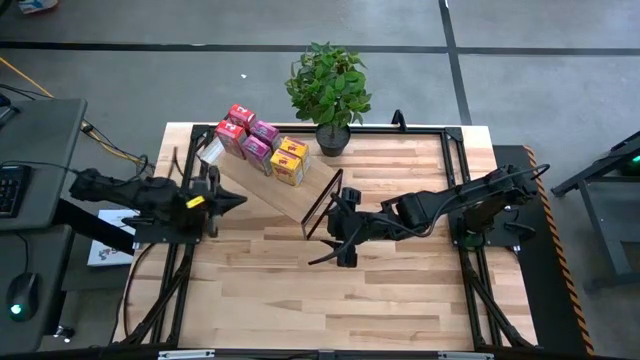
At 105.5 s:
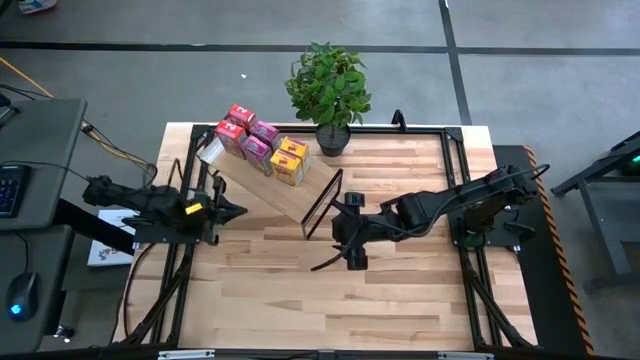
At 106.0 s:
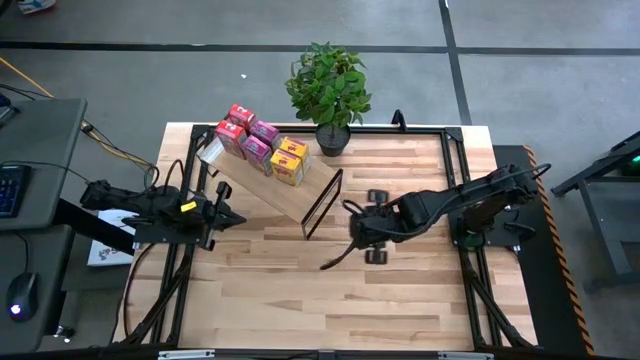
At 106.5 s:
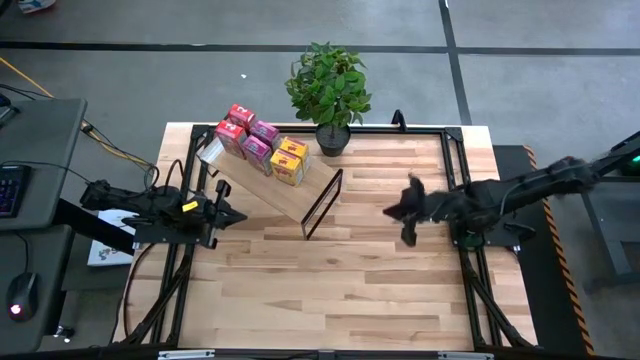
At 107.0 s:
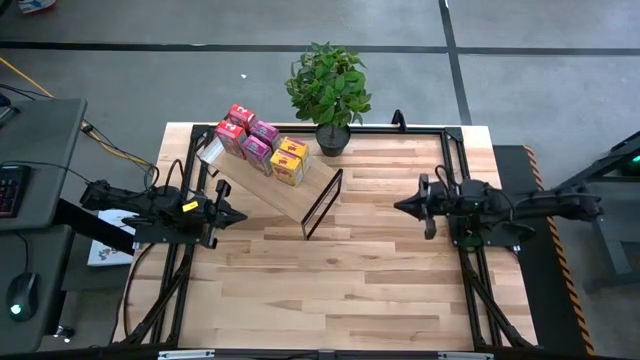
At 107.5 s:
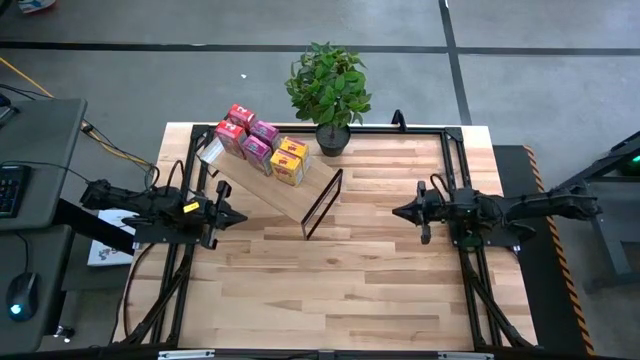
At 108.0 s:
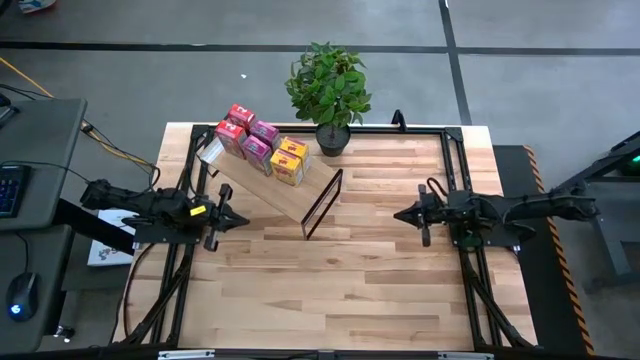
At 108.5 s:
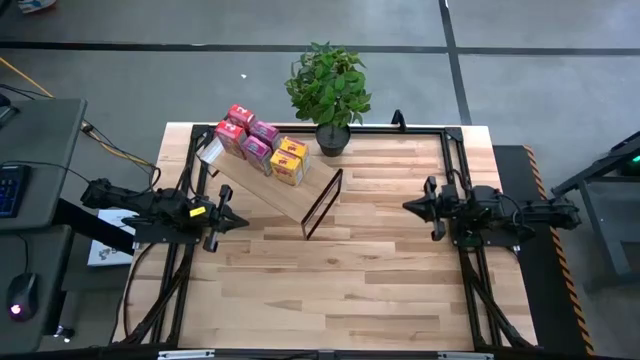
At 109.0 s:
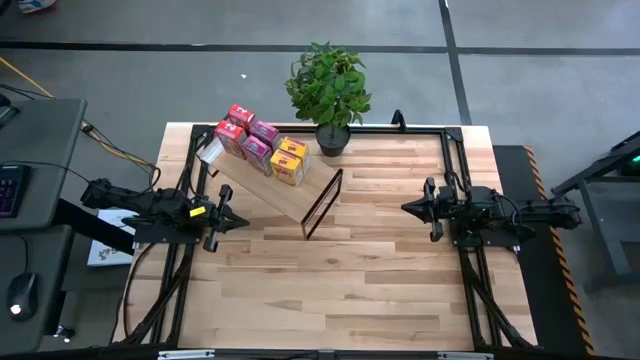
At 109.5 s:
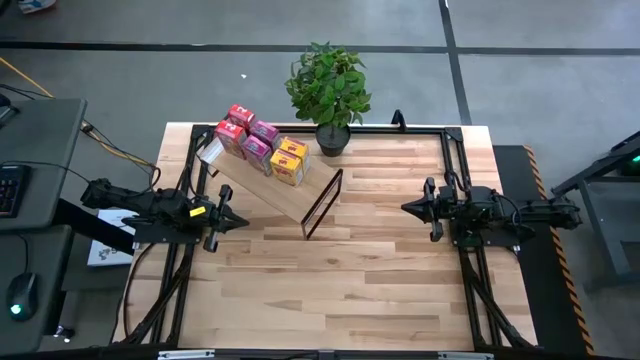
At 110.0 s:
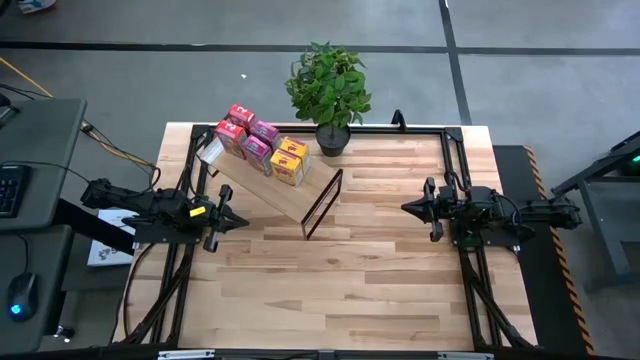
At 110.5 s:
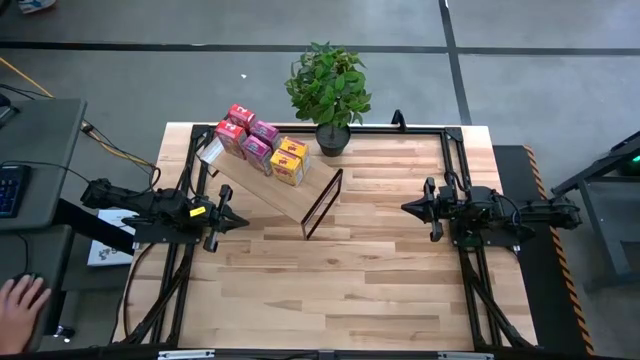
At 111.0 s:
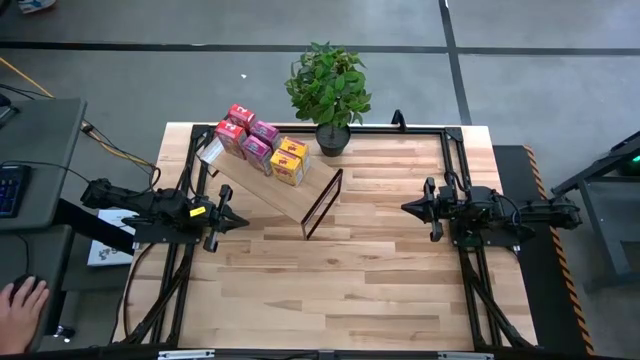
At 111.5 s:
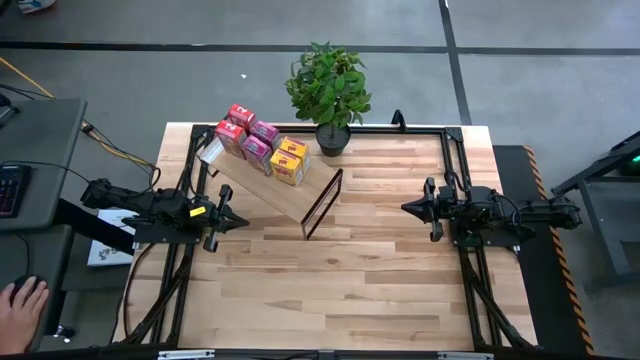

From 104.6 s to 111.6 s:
Task: Stack cereal on shelf
Return to Home Position

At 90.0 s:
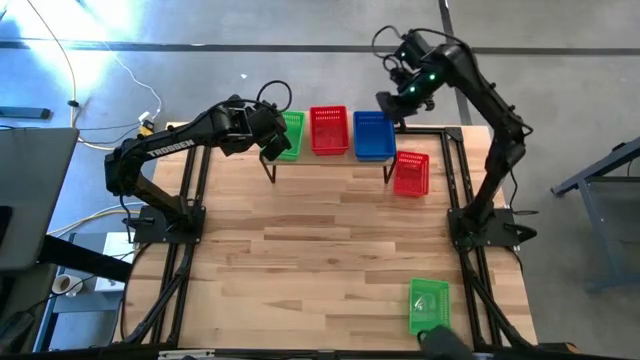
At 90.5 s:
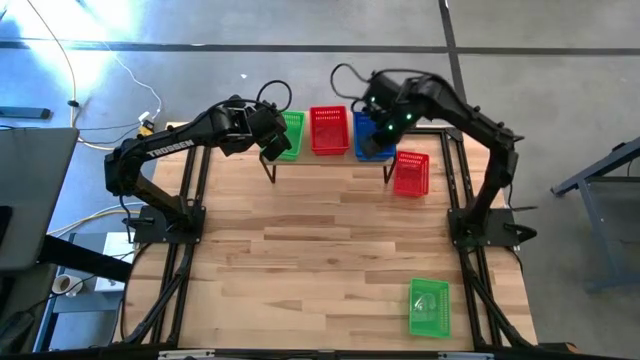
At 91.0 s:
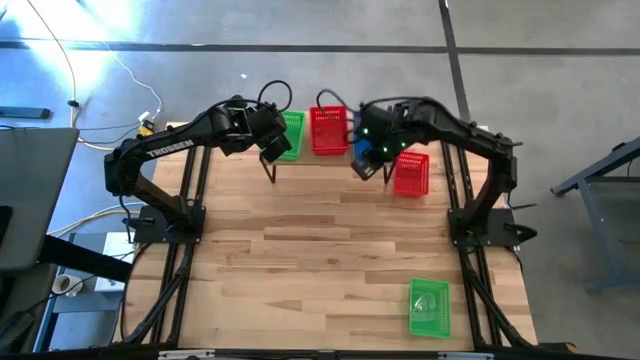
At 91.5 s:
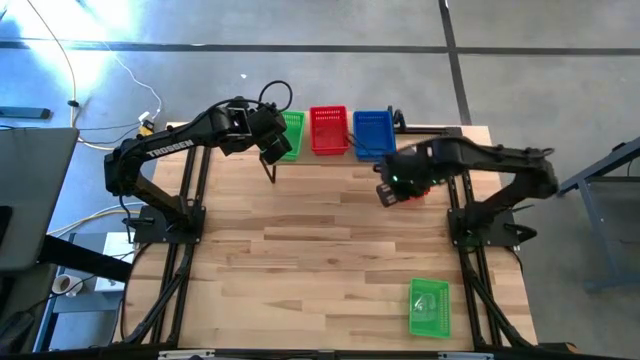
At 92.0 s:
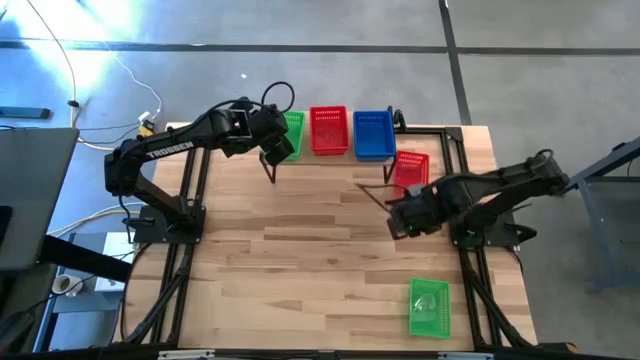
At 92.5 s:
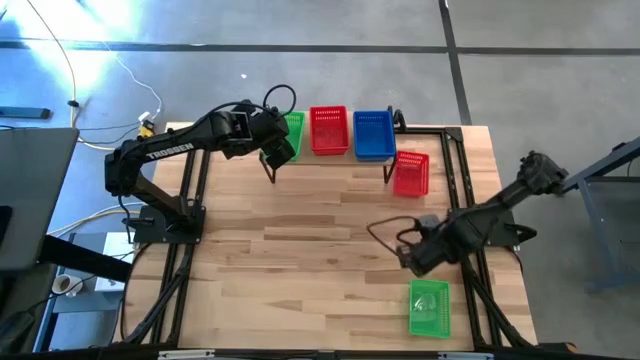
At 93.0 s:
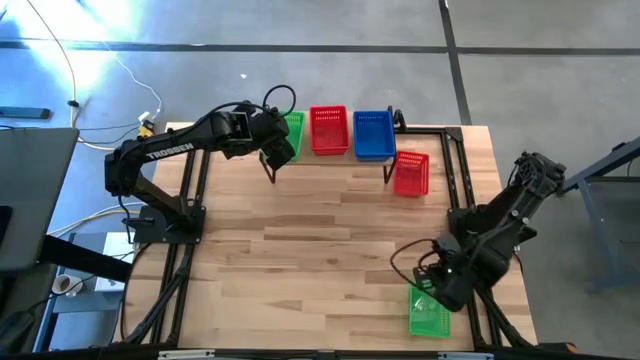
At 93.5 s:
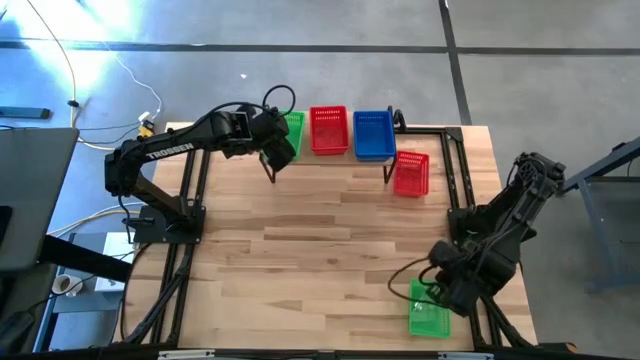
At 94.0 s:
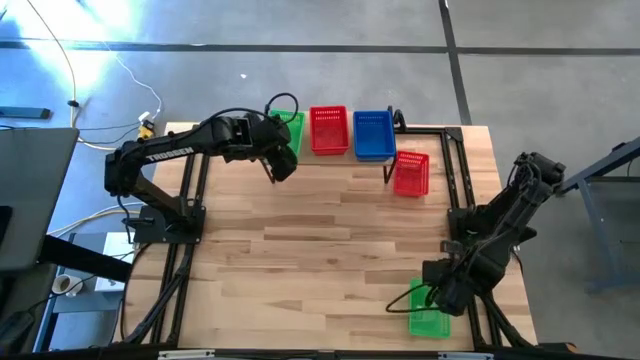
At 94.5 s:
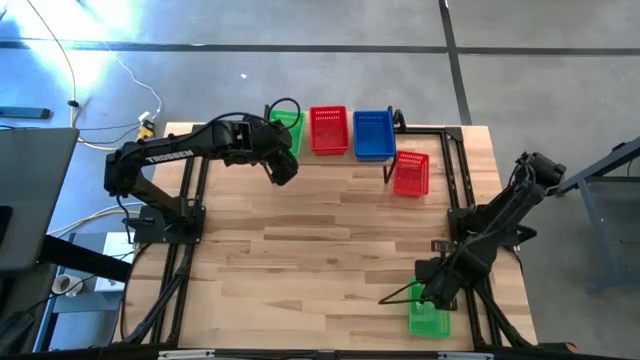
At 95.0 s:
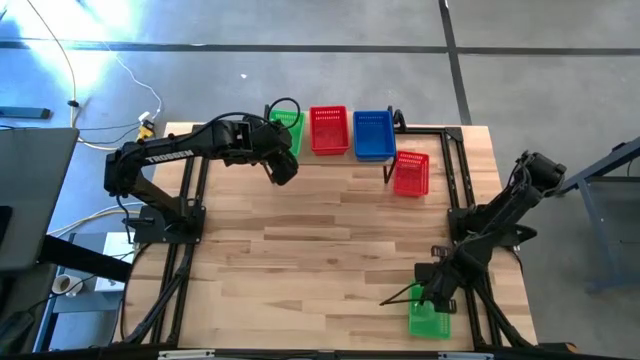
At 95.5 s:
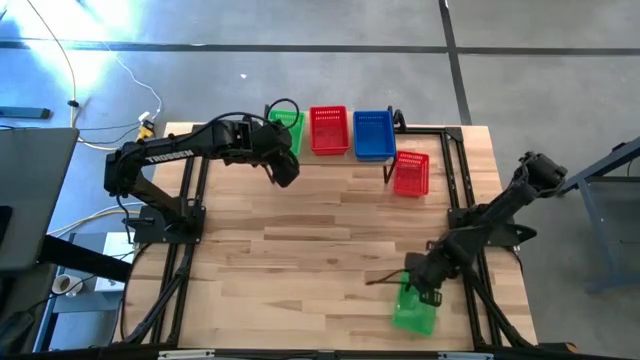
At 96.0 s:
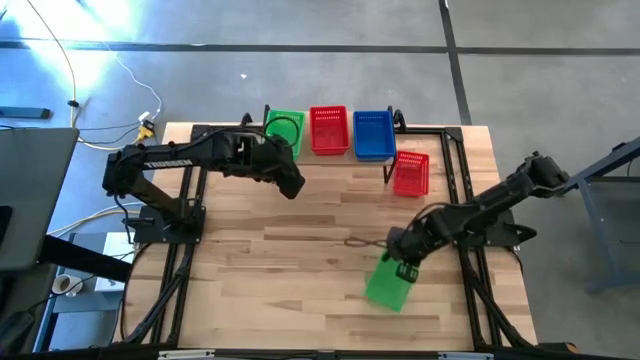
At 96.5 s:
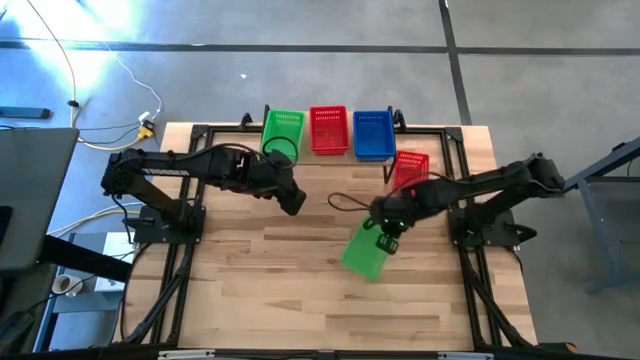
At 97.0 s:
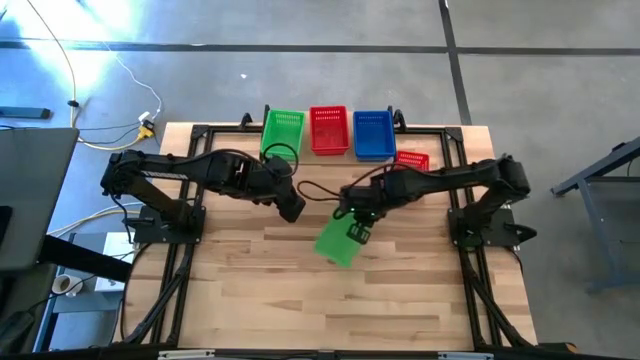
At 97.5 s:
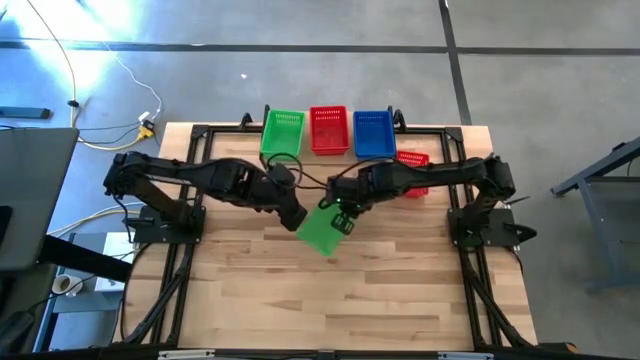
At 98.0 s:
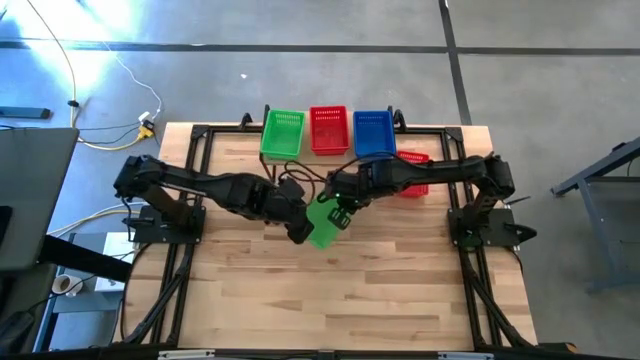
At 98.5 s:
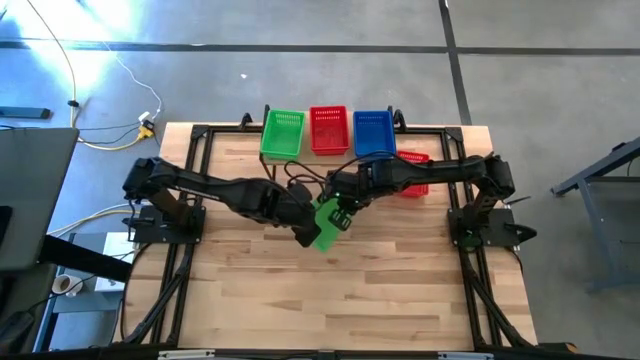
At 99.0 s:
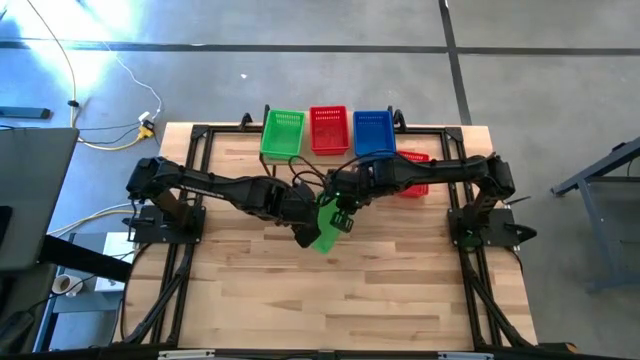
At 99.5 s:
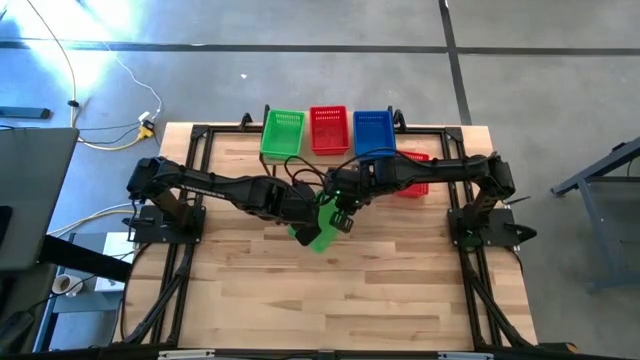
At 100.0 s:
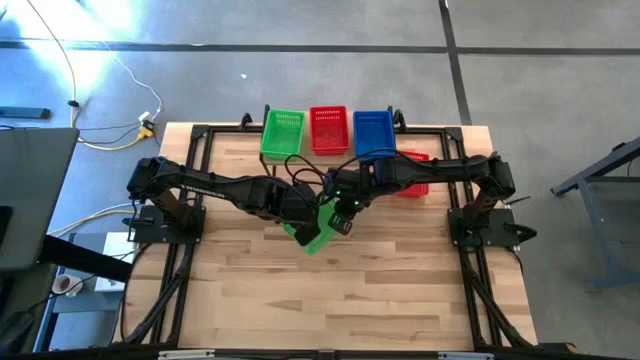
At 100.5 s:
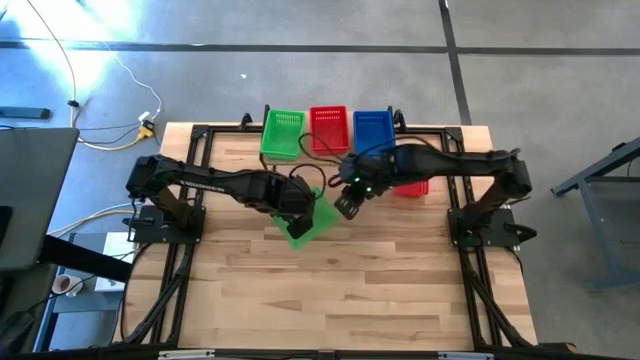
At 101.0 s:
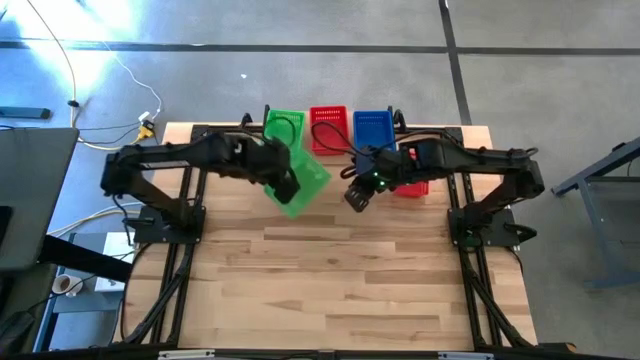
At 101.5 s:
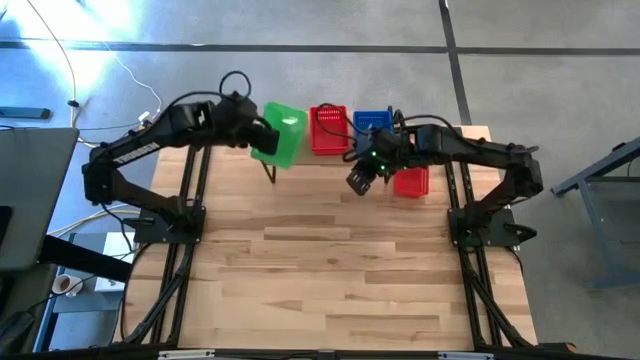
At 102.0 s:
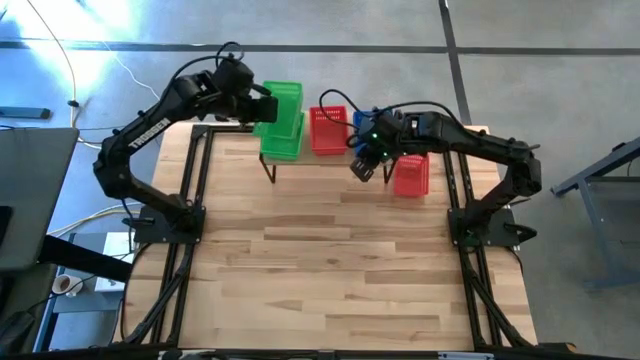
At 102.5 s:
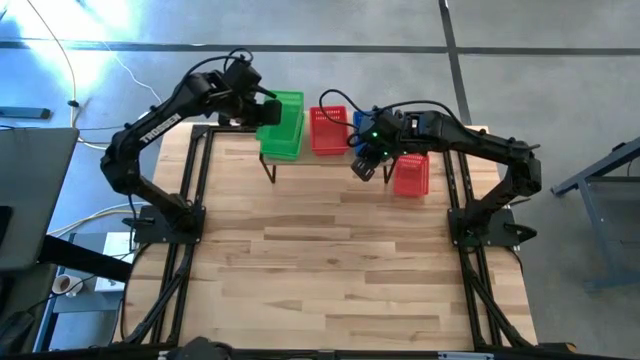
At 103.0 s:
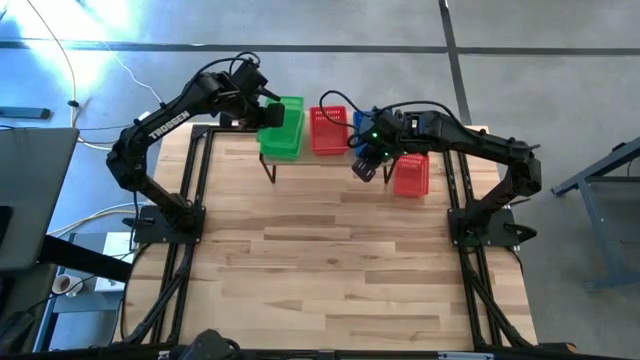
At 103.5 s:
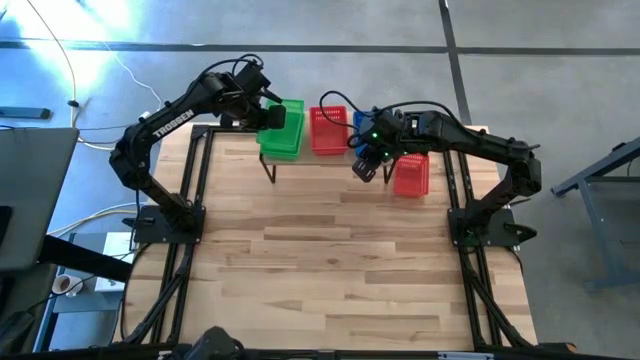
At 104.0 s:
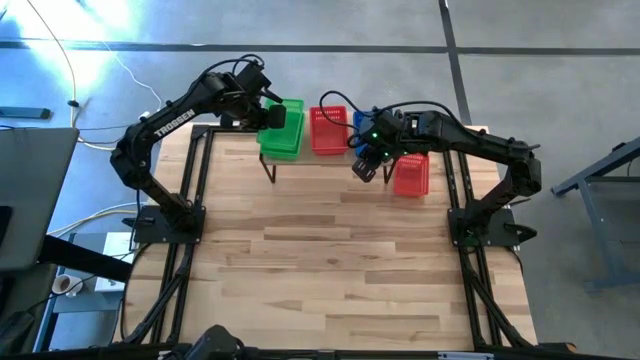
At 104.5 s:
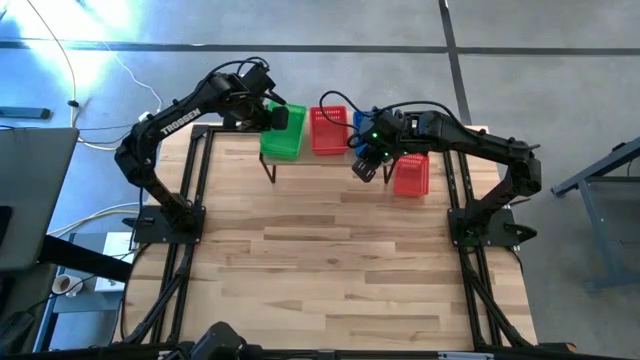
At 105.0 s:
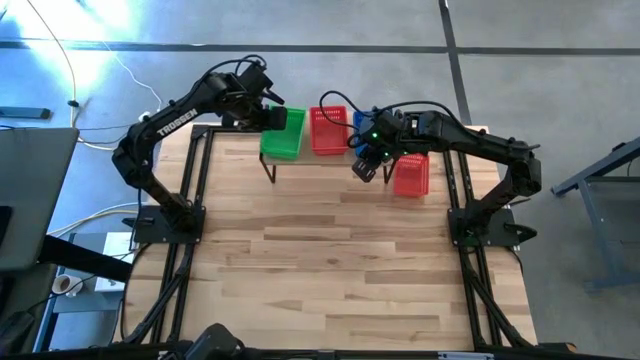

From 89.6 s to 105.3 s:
Task: Stack baskets on shelf by color
Stack the green bin on top of the stacked green bins on the shelf
